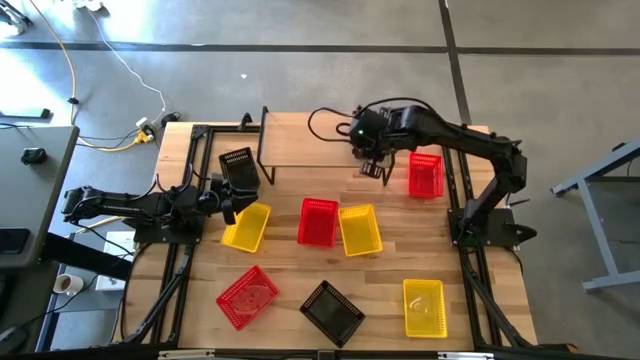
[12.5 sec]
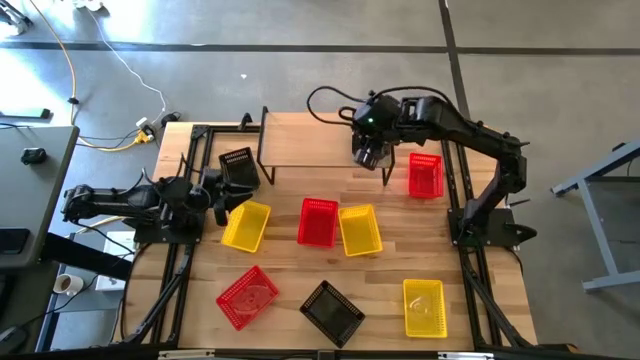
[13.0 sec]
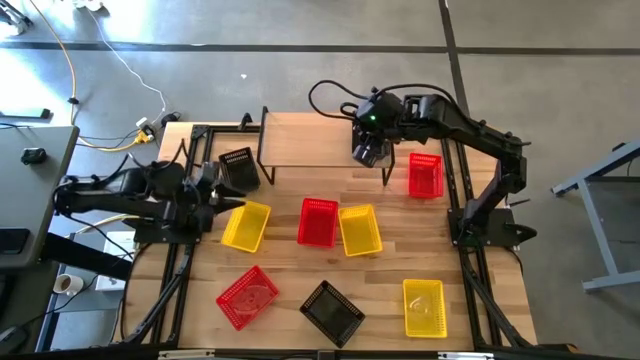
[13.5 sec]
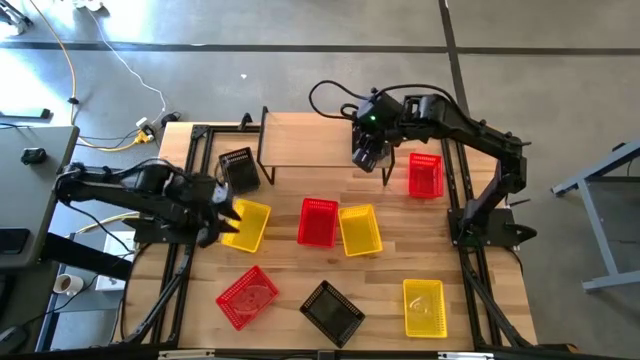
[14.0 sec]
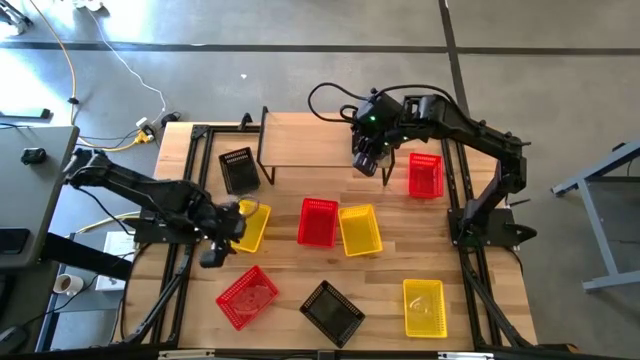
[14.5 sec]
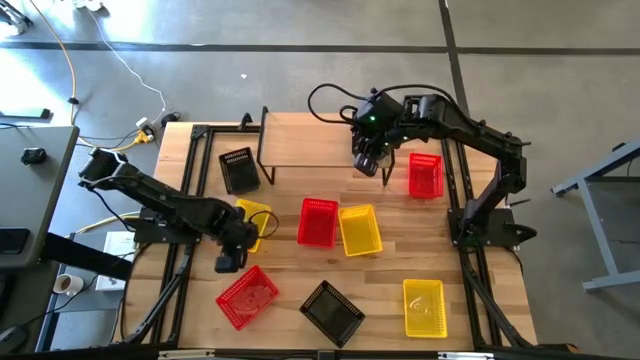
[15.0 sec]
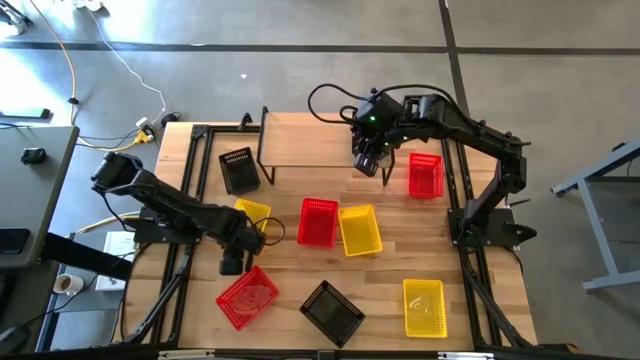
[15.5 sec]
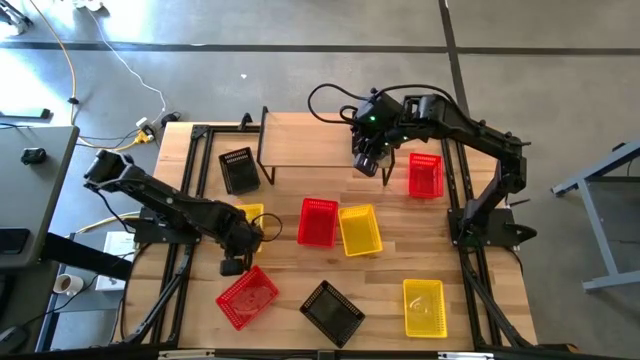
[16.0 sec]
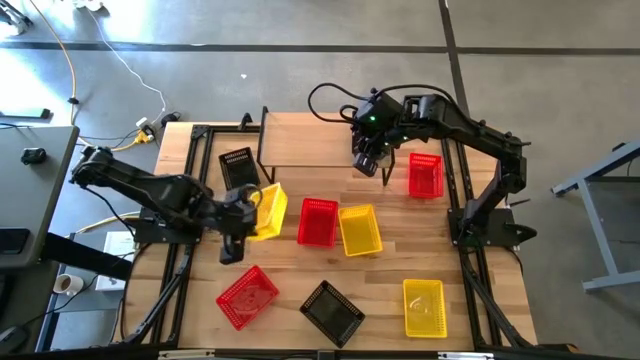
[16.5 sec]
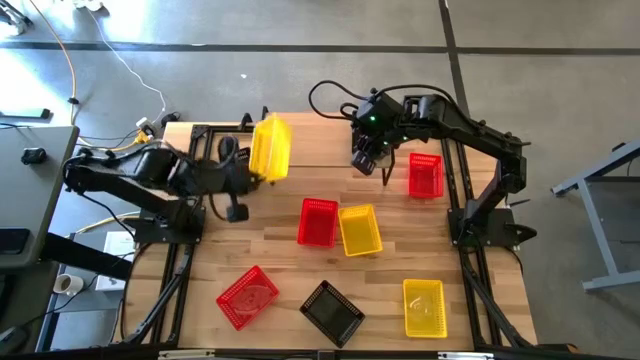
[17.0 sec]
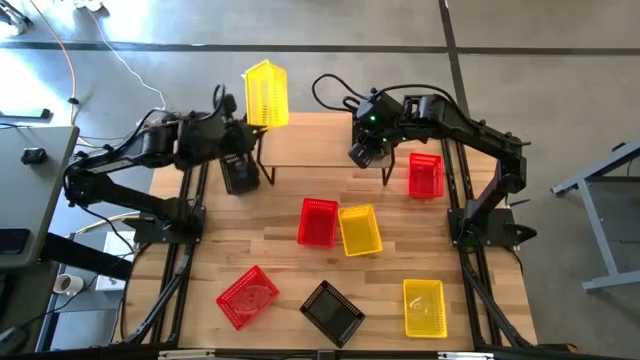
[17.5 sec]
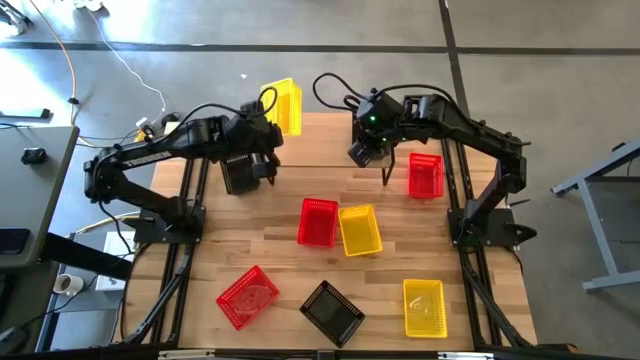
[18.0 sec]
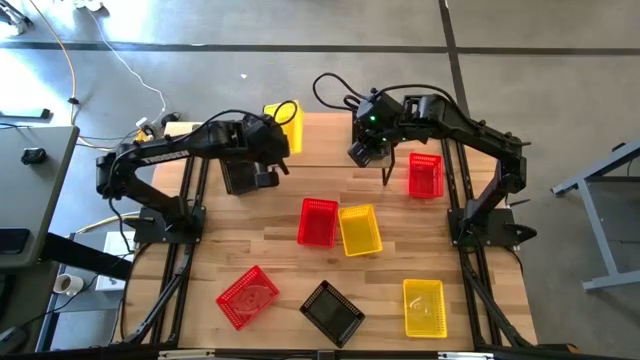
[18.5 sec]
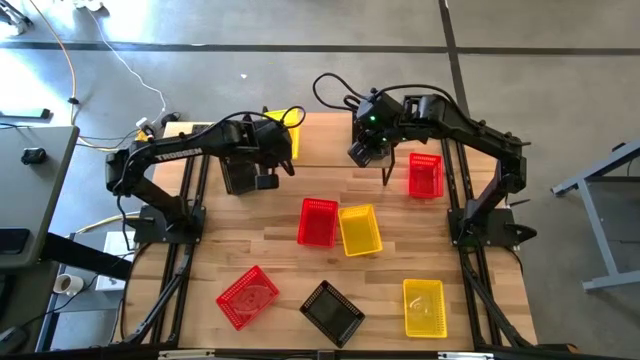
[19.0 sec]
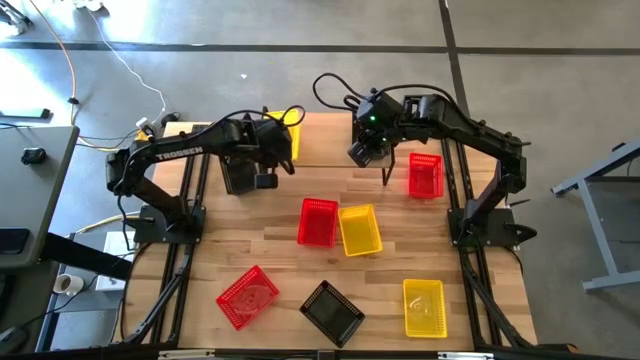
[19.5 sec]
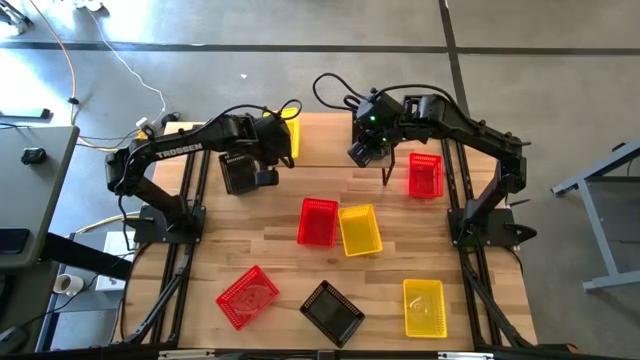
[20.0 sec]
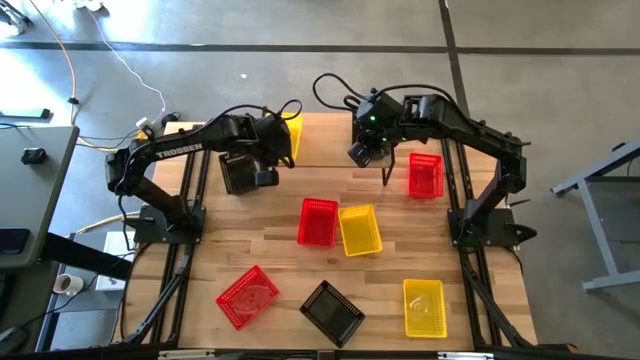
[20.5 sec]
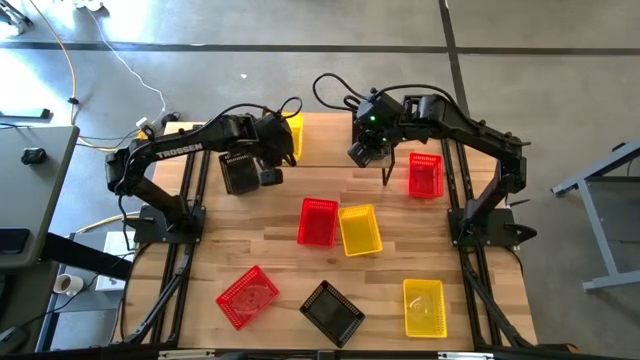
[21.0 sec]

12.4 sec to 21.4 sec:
Task: Stack baskets on shelf by color
Put the top left yellow bin on the shelf

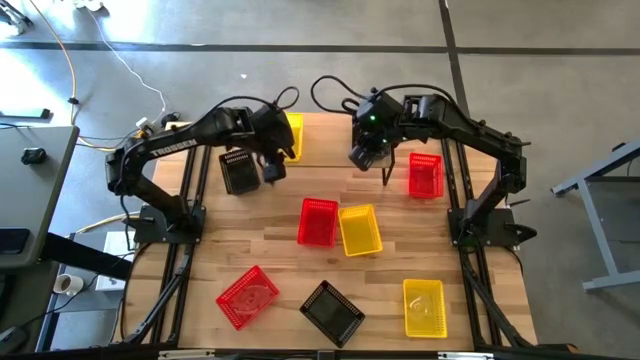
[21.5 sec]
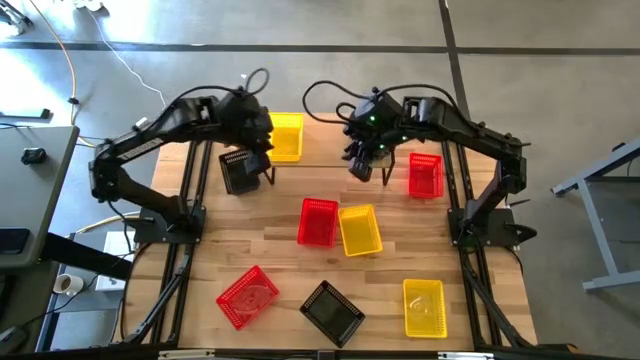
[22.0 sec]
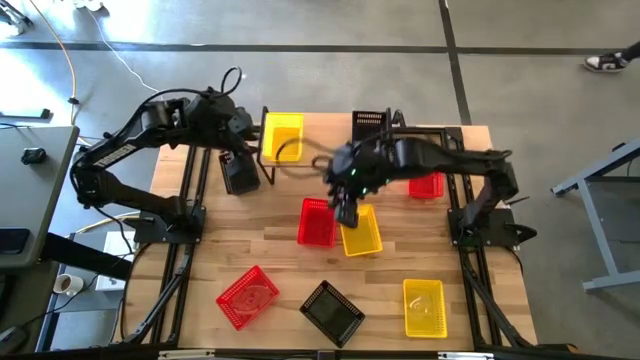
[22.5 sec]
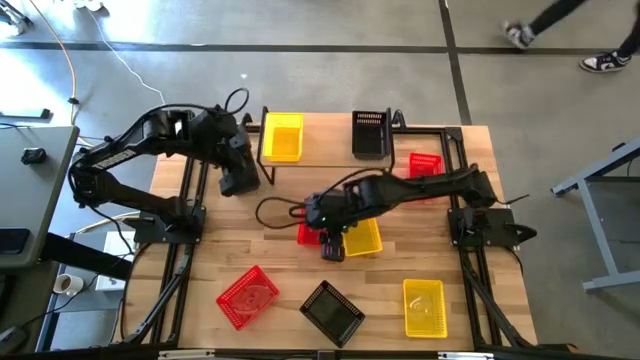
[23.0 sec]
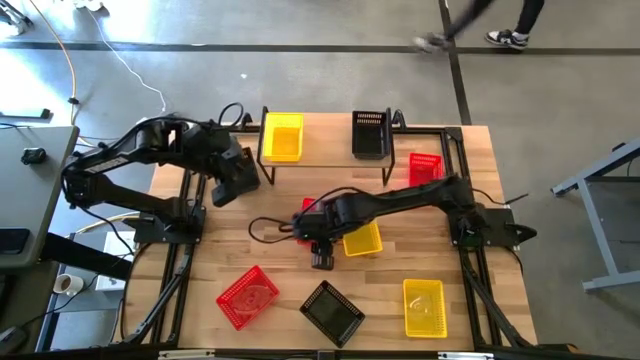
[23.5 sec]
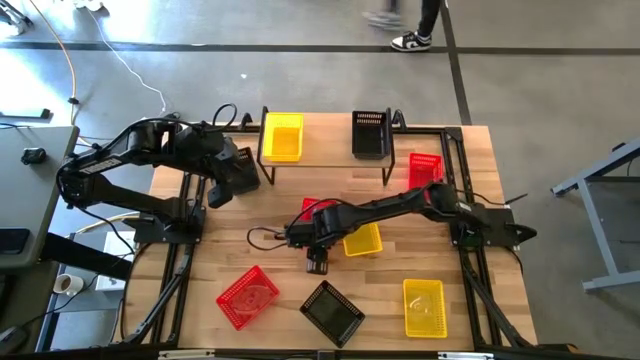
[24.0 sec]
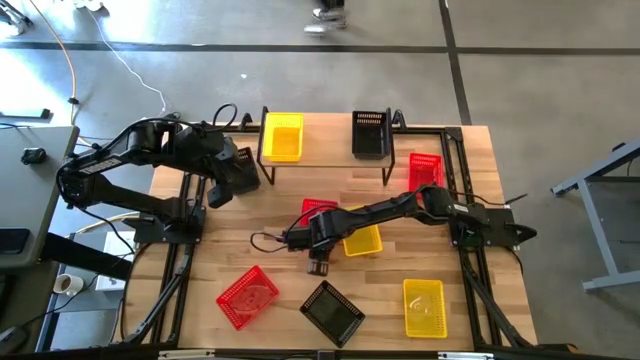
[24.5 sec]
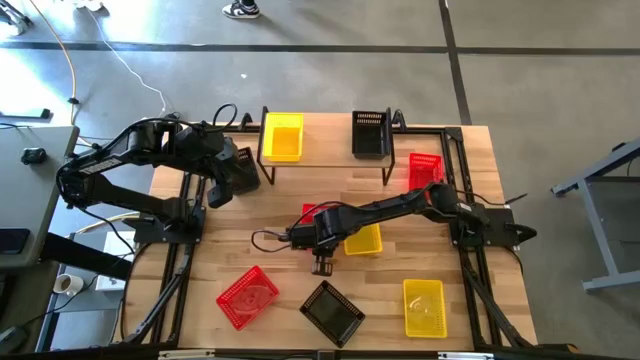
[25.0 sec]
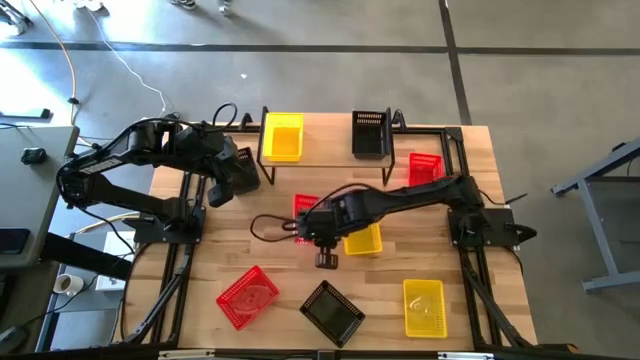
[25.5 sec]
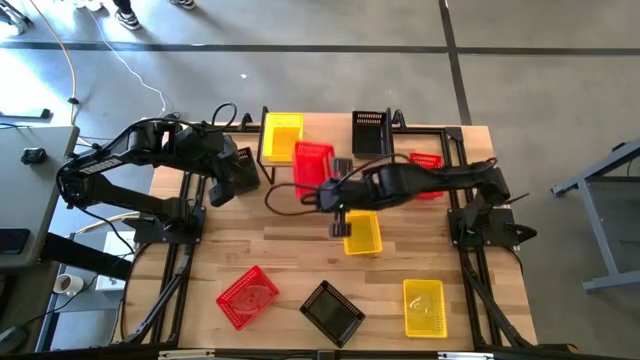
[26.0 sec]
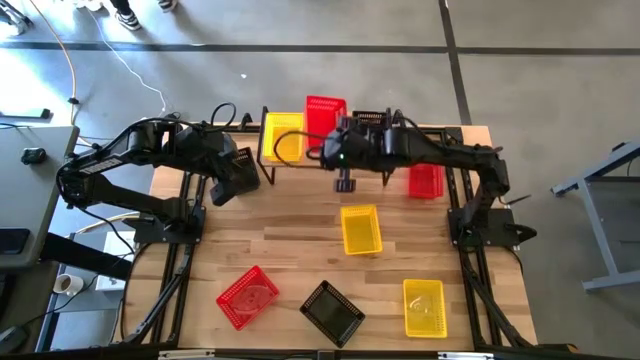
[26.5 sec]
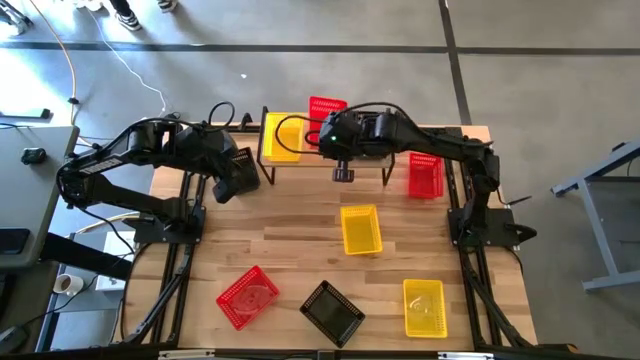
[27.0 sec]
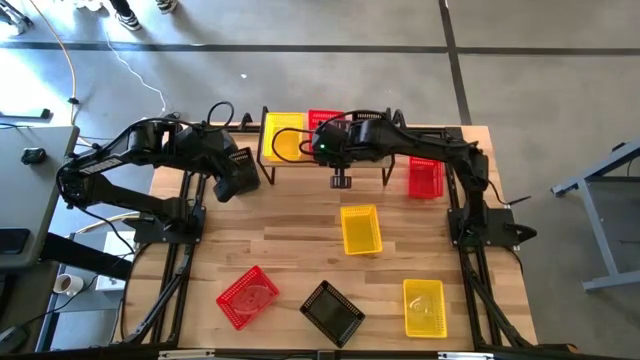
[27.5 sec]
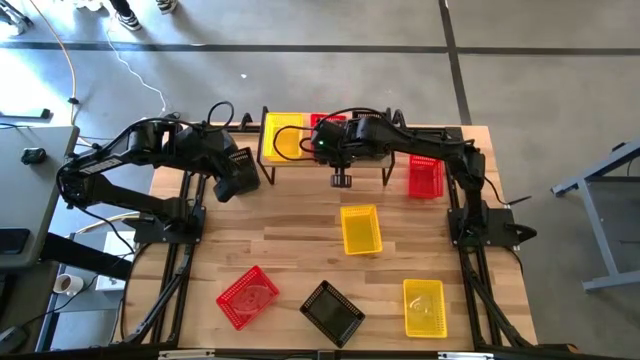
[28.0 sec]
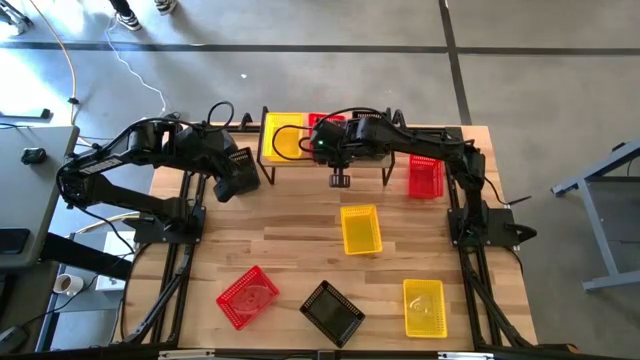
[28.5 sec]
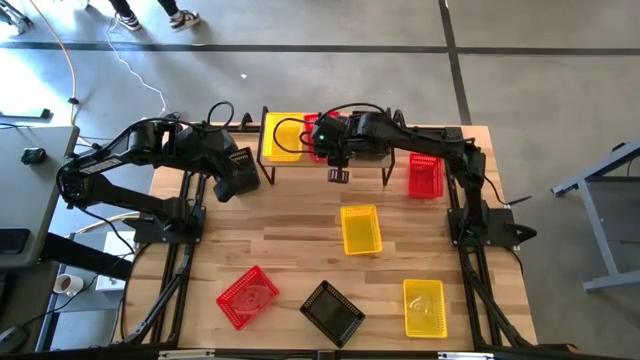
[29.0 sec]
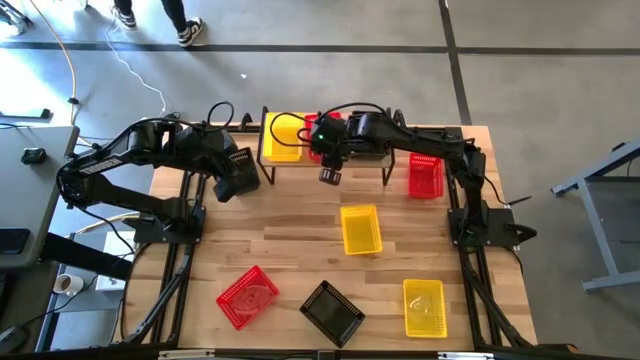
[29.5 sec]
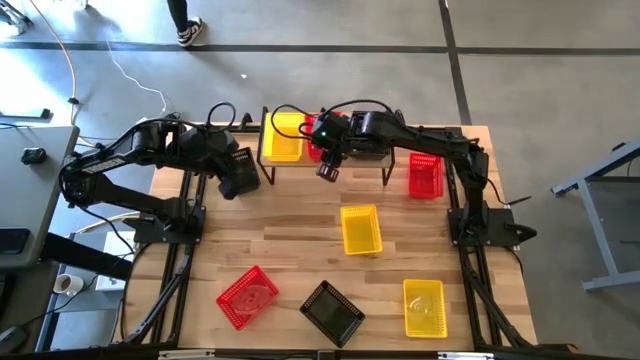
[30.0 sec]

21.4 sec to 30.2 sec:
Put the middle red bin on the shelf

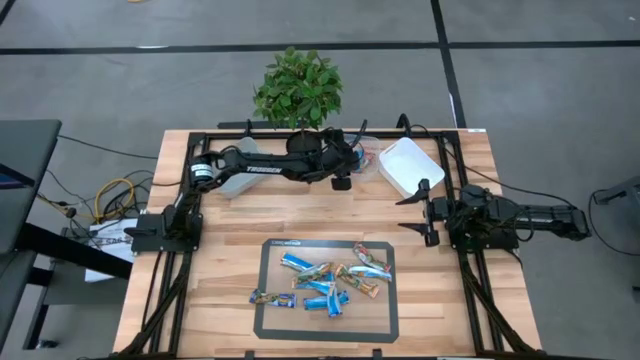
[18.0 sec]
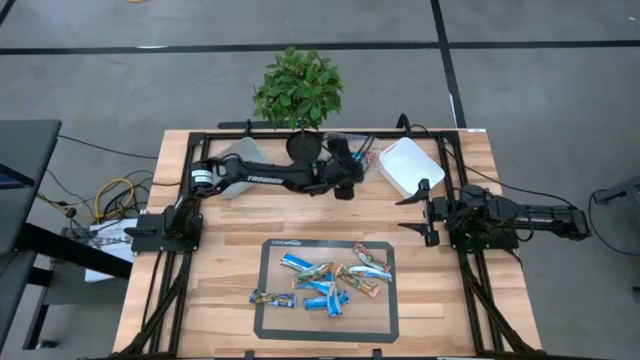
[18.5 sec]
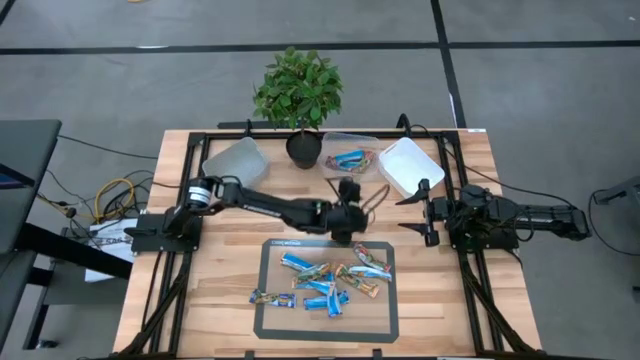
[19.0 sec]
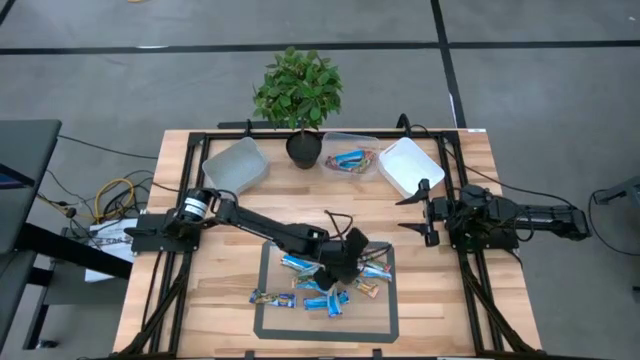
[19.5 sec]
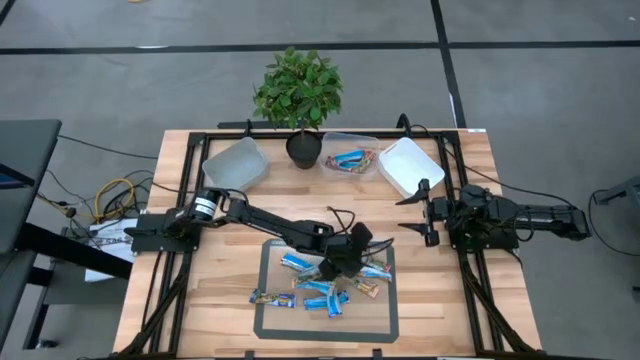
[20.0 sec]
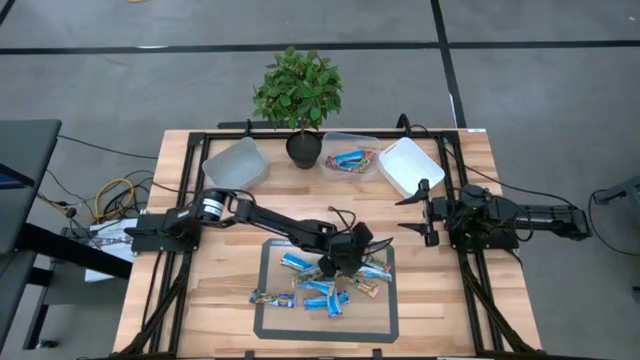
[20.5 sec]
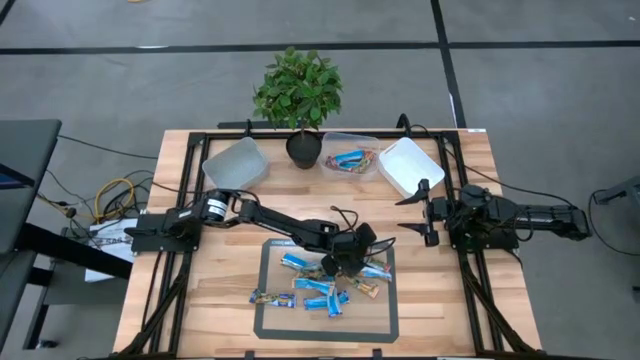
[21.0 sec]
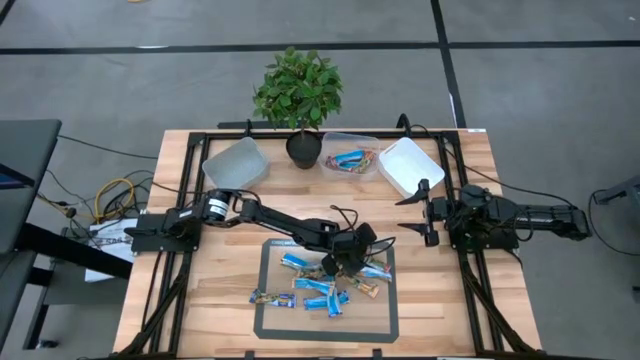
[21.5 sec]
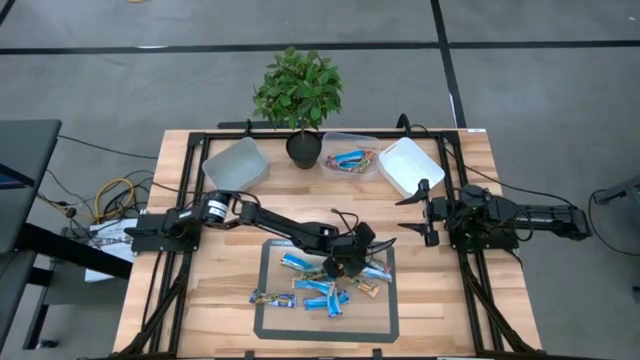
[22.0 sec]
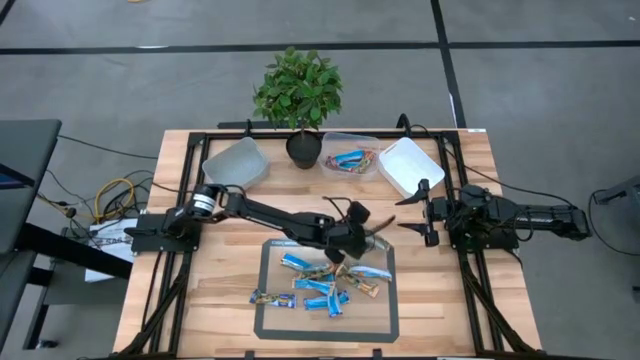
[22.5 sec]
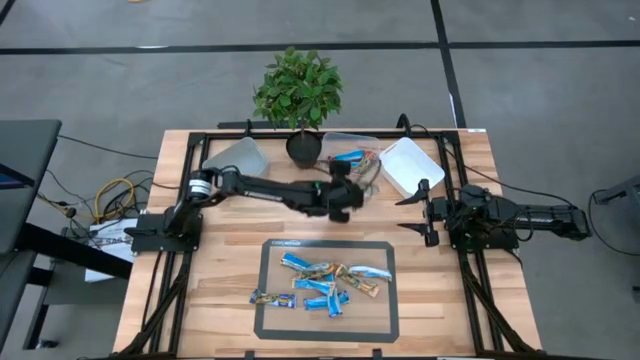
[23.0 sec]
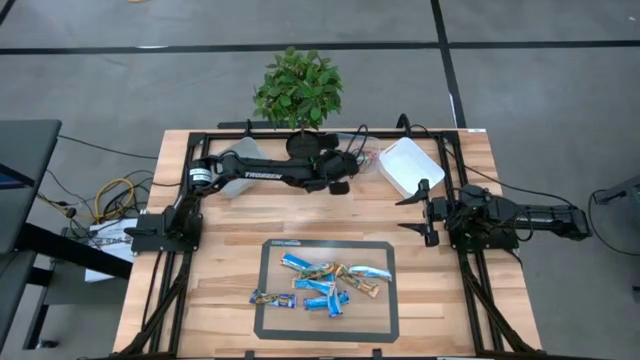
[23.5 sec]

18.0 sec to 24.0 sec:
Task: Pick and place Granola Bars by type
Put the red granola bar into the transparent bin
